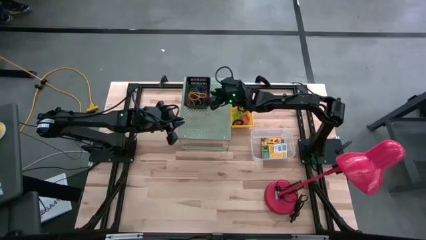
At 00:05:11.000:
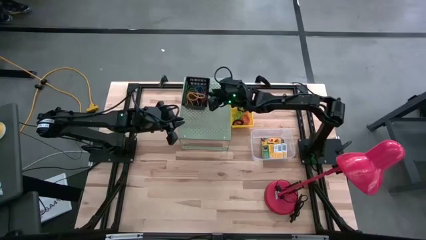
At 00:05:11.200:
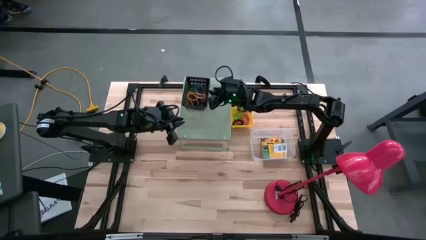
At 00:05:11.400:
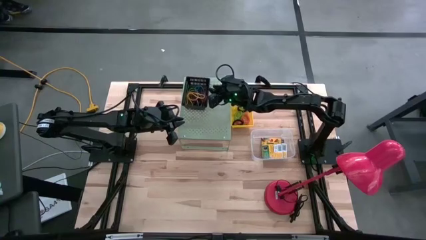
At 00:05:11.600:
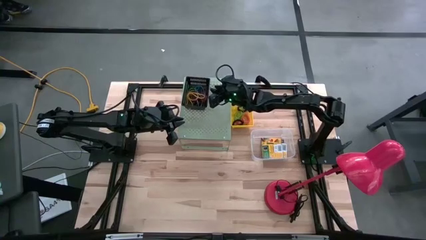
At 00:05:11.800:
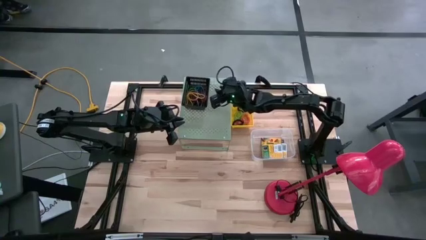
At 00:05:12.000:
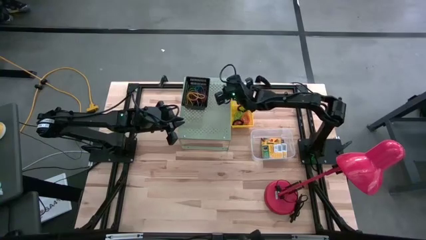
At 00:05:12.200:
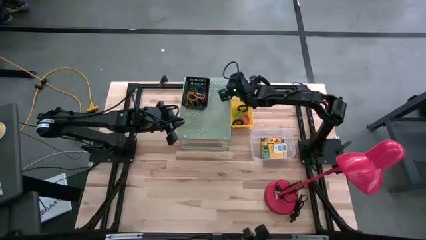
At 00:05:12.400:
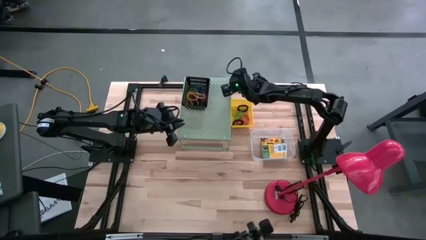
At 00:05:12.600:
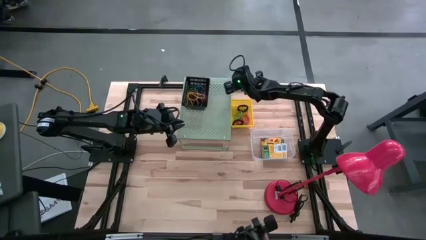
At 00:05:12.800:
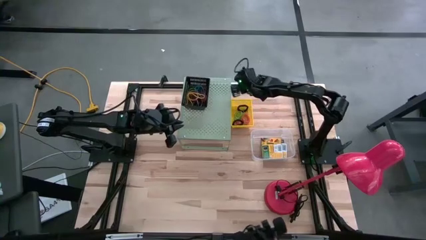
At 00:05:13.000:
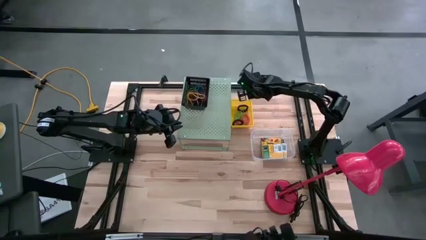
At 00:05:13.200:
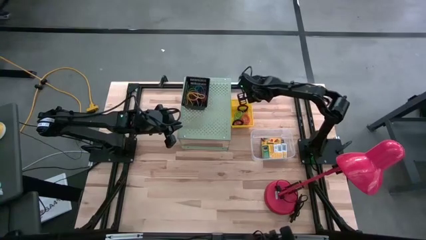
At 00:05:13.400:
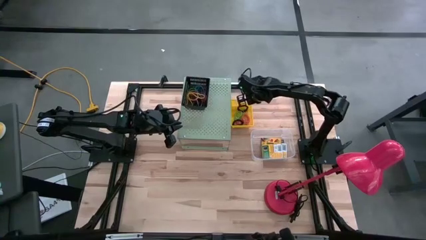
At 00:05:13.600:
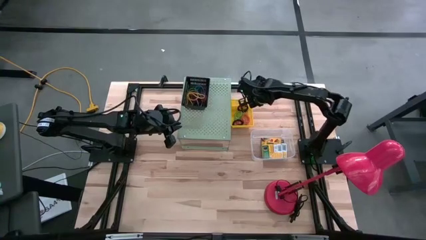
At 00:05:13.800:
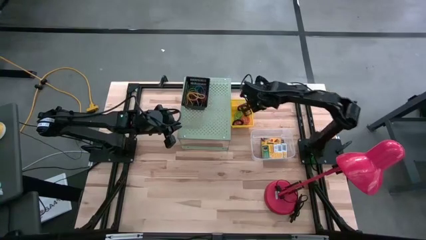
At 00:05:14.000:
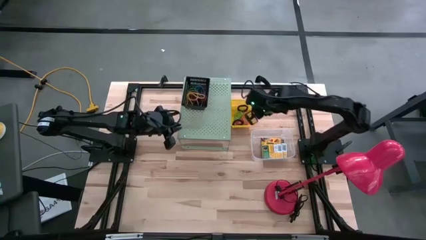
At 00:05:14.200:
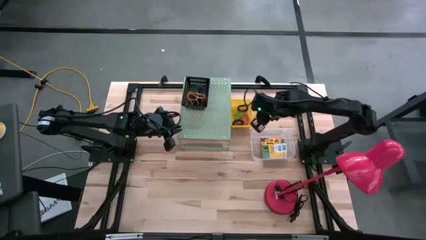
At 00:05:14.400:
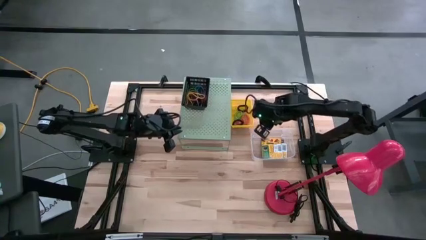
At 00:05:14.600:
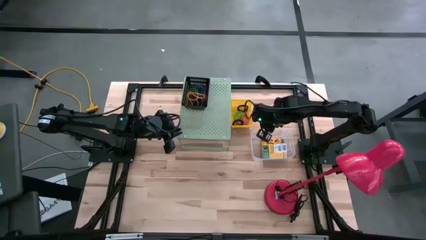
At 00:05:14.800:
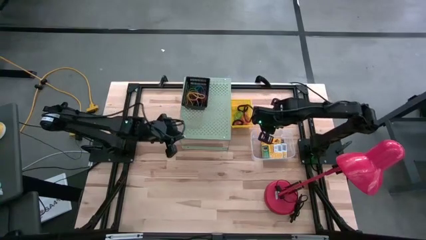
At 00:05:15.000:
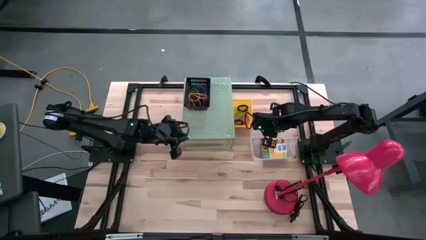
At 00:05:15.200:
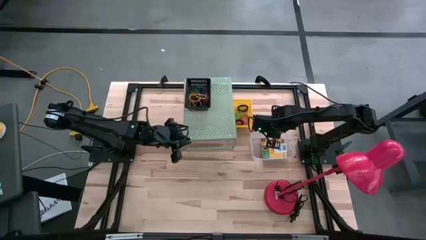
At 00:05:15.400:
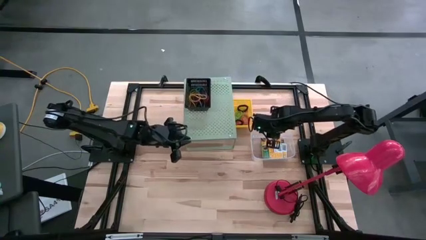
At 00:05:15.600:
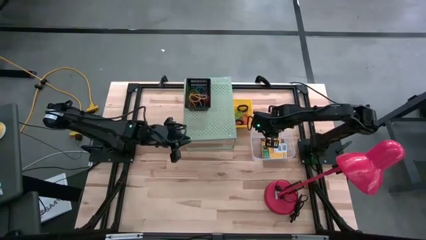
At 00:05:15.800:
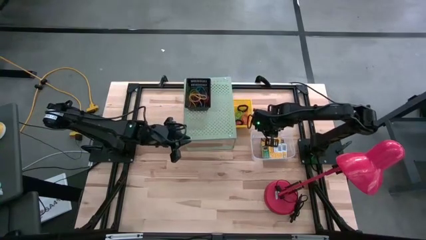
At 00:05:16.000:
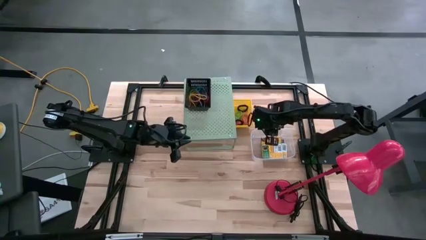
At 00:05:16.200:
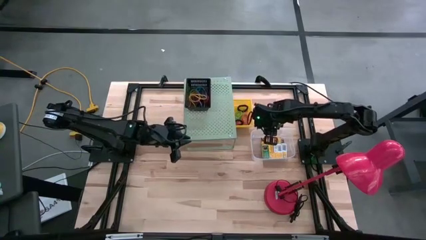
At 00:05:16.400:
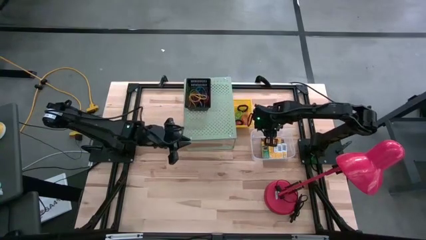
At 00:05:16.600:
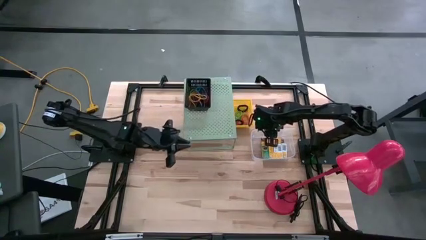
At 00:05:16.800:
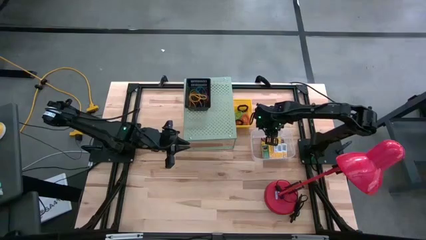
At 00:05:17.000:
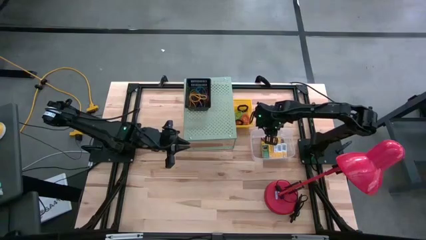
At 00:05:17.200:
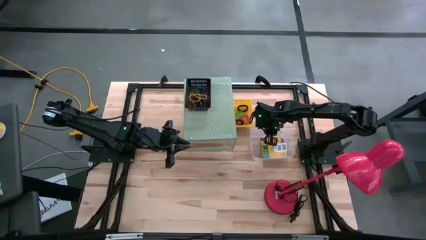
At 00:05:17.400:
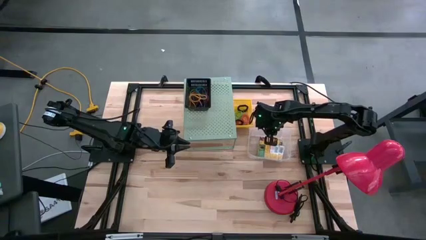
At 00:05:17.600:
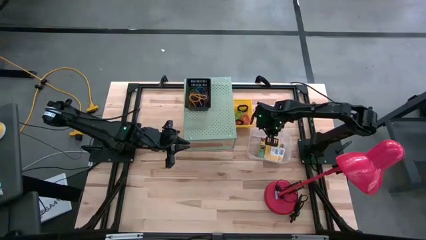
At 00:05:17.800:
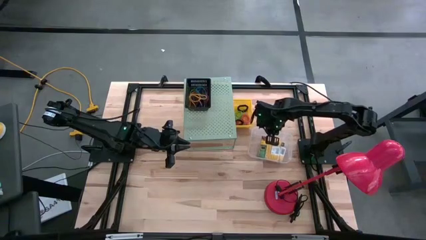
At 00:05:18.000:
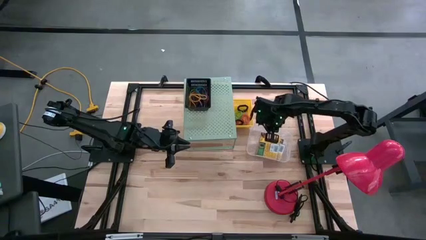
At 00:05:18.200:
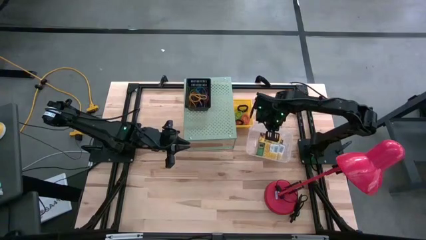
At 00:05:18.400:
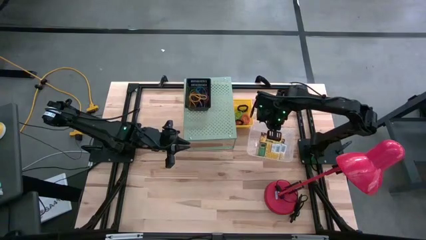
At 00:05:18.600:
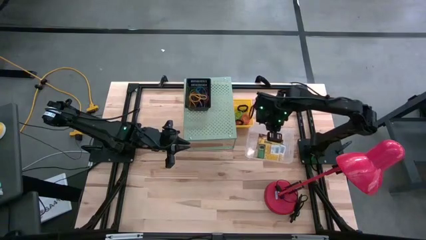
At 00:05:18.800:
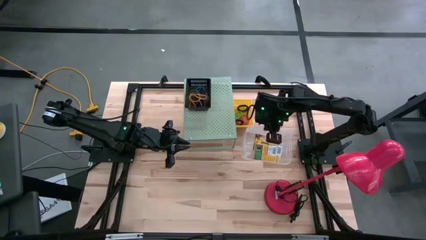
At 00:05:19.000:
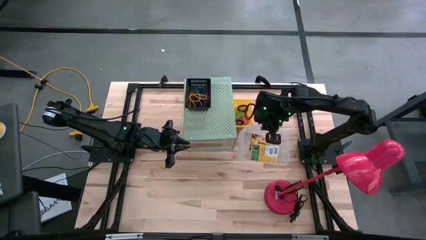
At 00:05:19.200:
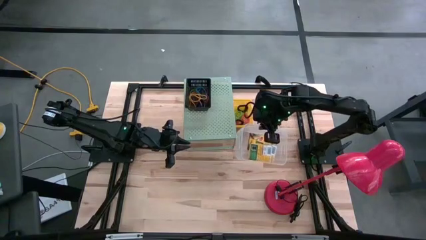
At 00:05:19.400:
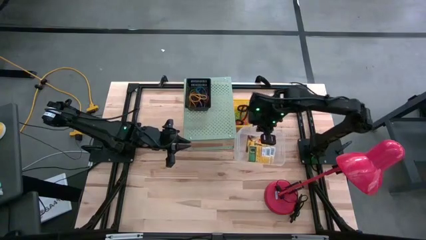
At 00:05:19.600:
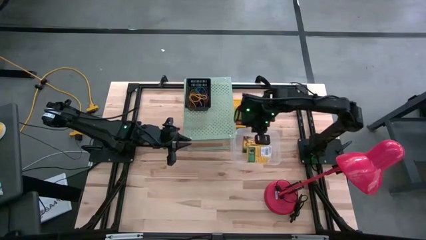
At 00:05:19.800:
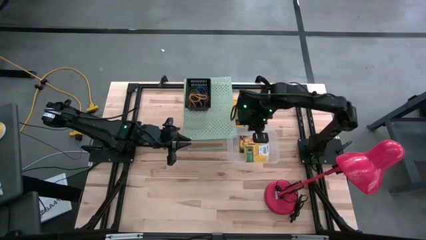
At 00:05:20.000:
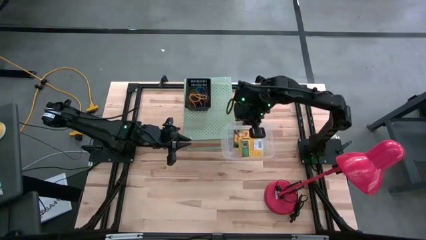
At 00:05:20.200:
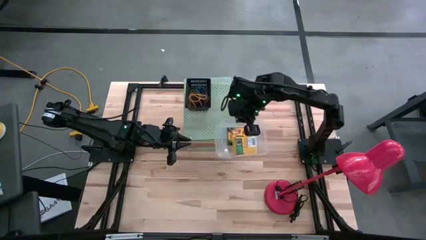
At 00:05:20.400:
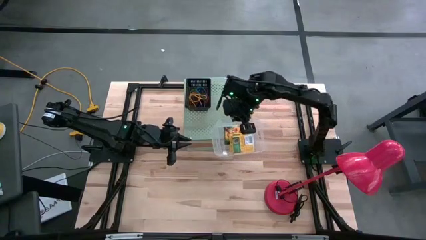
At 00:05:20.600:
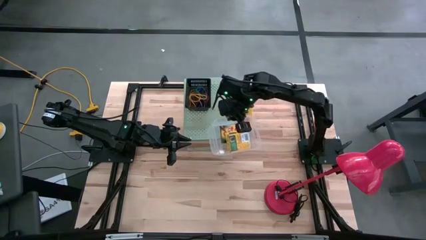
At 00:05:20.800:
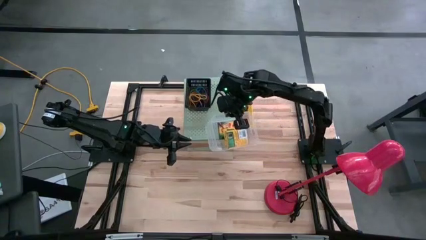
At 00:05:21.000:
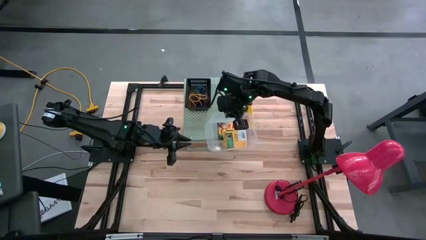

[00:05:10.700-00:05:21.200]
Task: Pick & Place Office Desk Supplies
Put the transparent bin with sorted crayon boxes on the shelf
